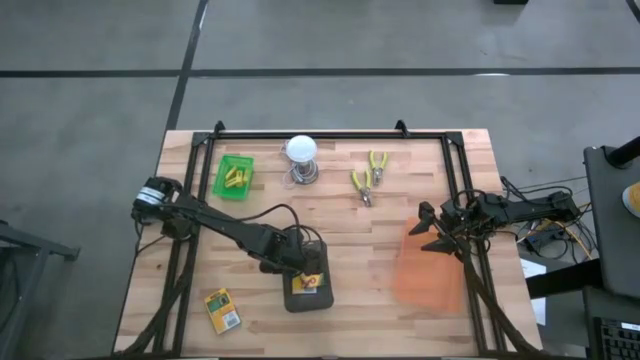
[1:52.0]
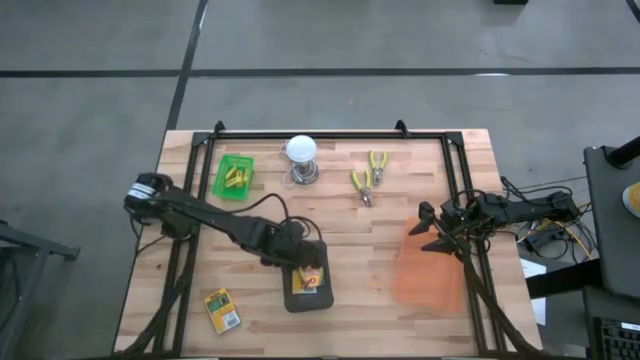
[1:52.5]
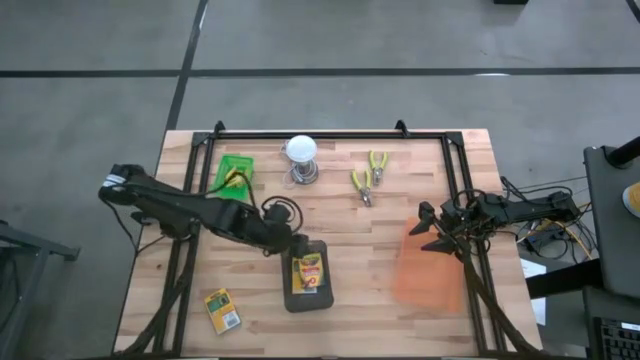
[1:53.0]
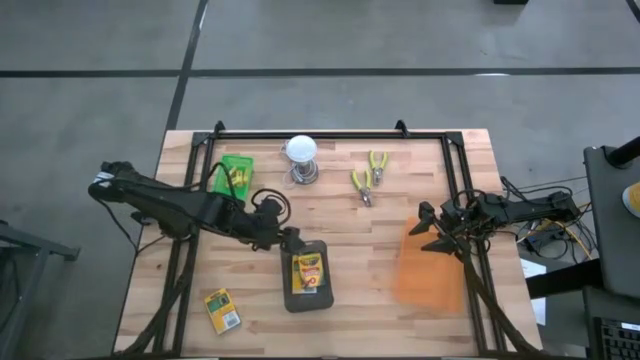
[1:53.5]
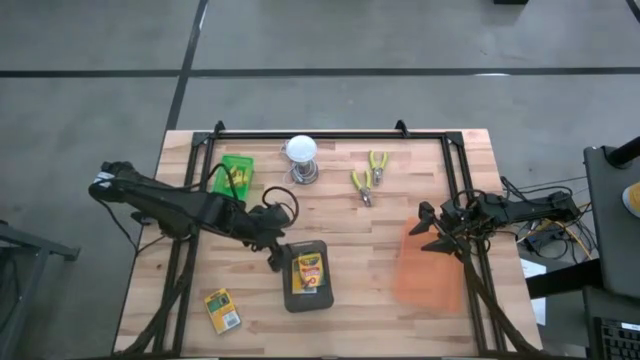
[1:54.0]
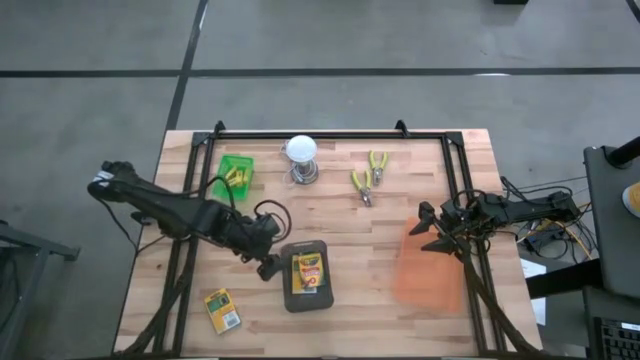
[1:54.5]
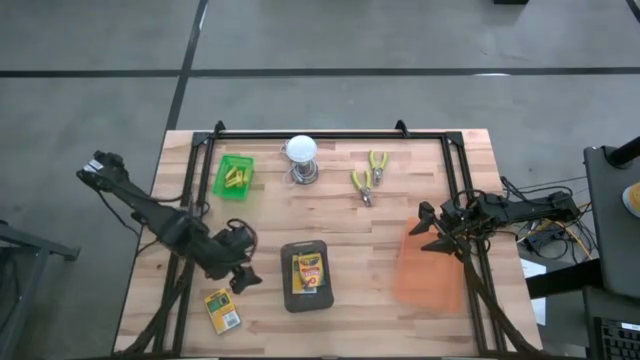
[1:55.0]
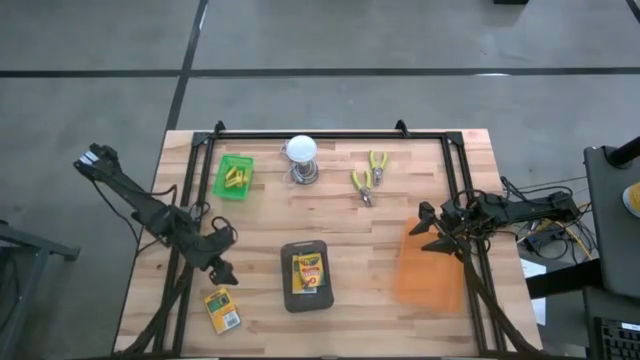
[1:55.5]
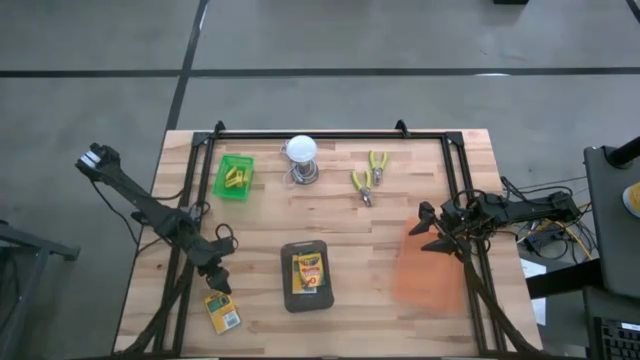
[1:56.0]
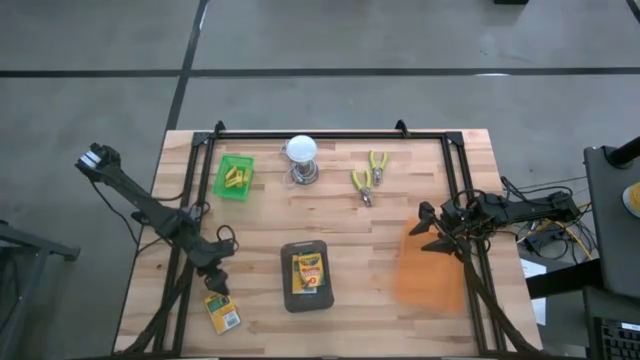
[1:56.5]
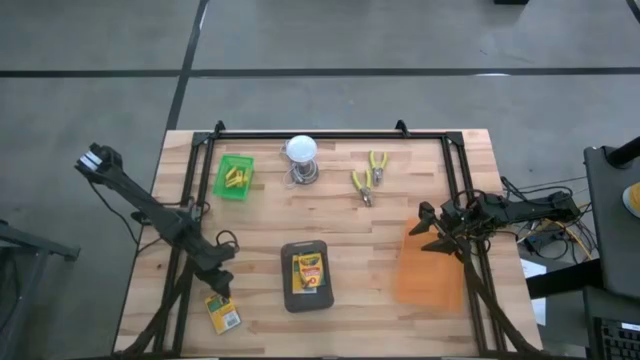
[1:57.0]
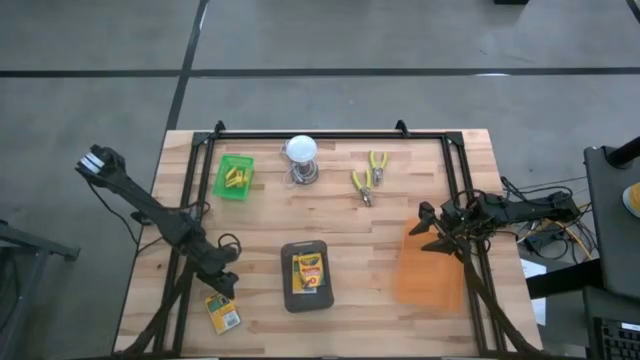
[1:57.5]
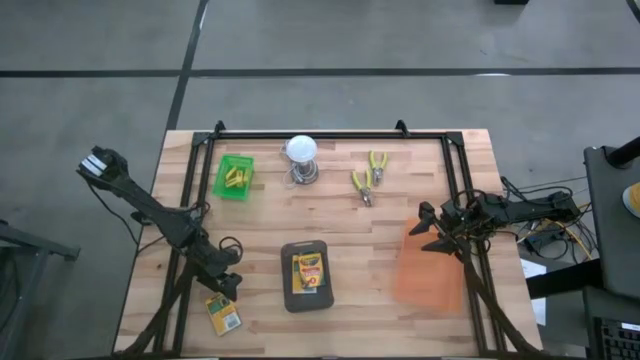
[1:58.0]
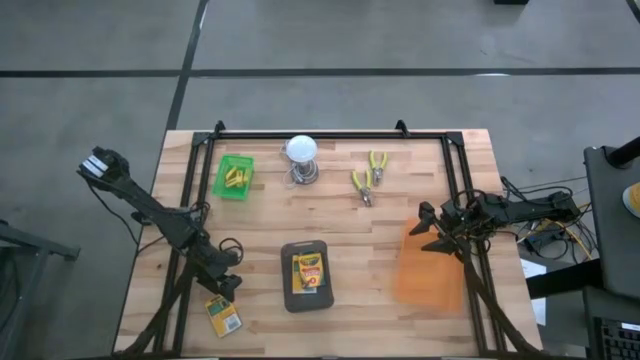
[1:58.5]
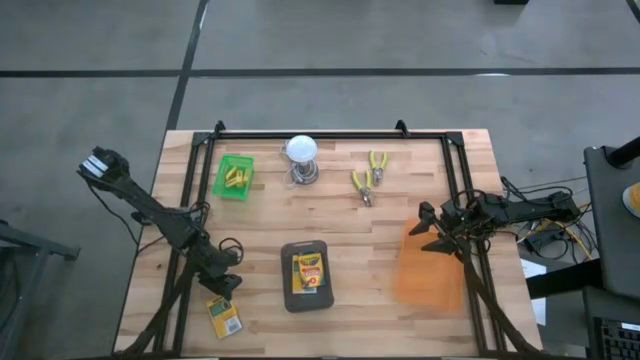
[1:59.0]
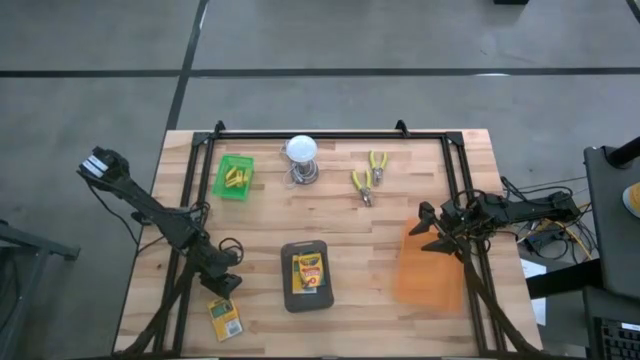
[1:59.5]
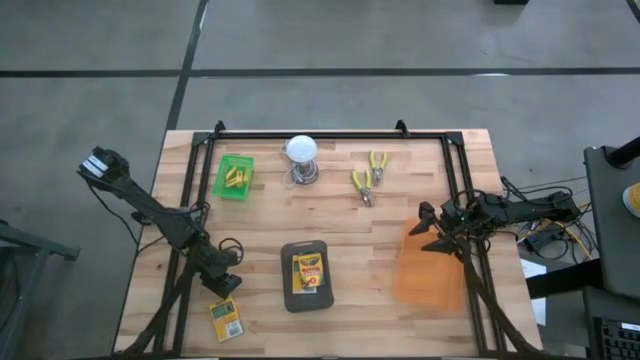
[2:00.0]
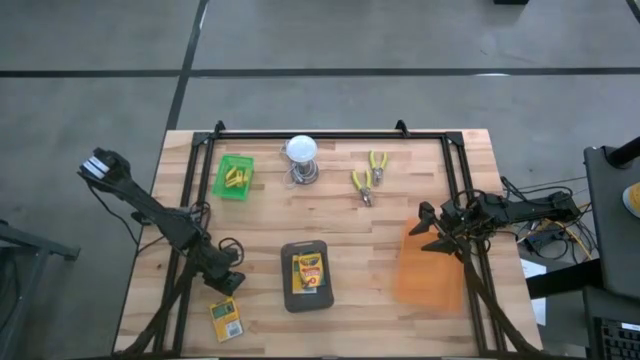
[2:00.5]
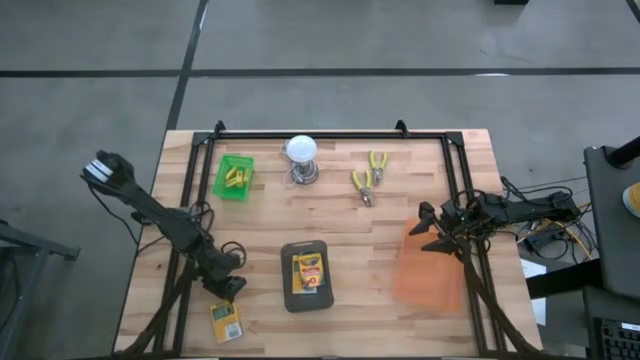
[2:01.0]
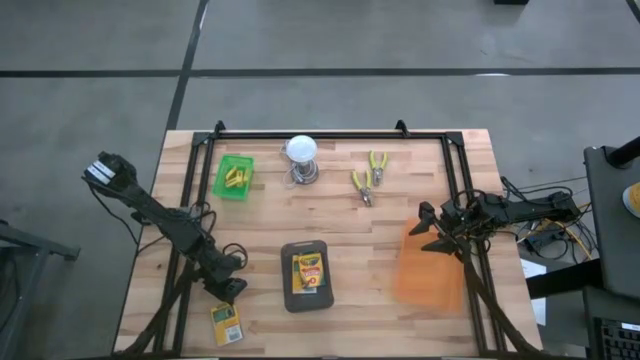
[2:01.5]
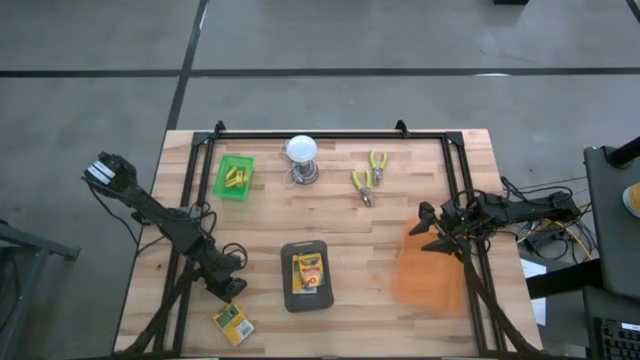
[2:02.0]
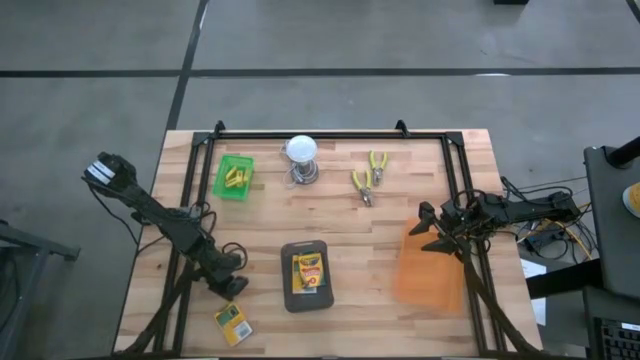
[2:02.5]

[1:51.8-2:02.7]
Task: Pick & Place School Supplies
Put the yellow crayon box into the black bin

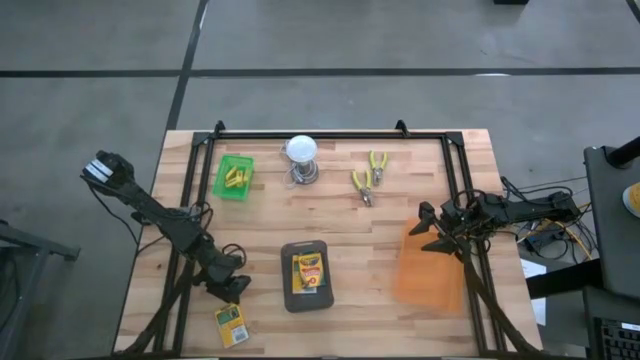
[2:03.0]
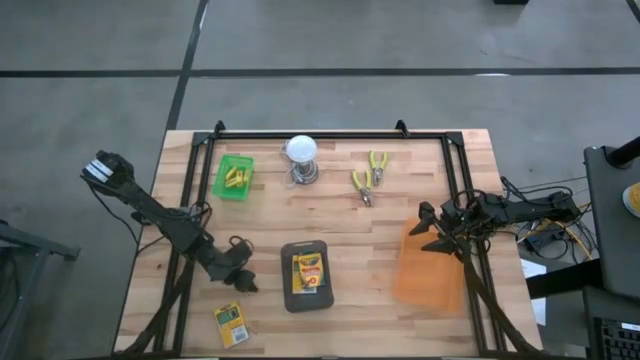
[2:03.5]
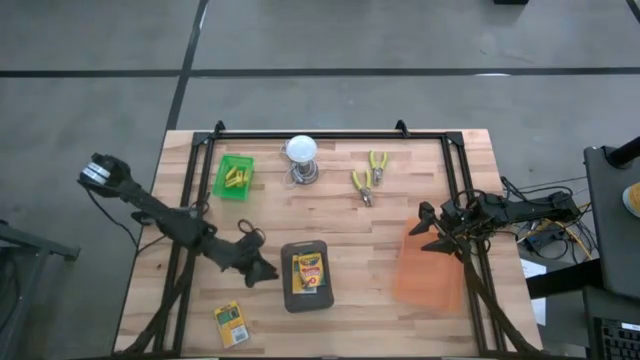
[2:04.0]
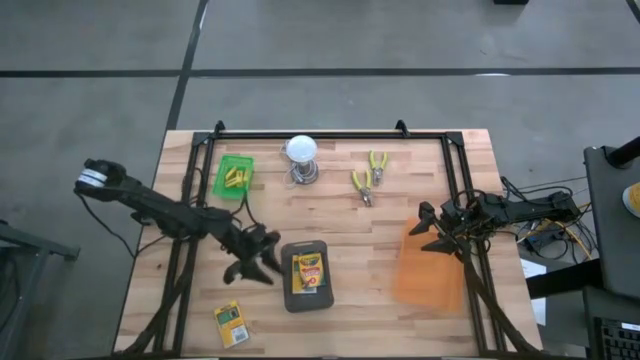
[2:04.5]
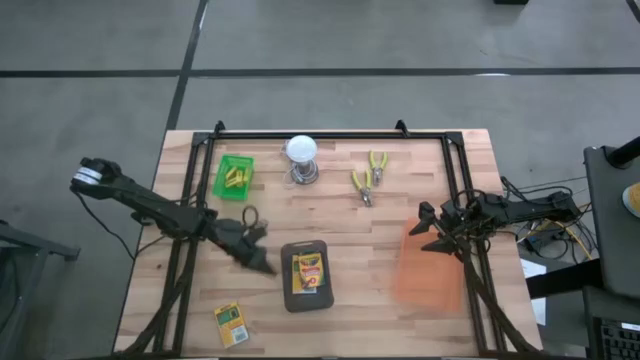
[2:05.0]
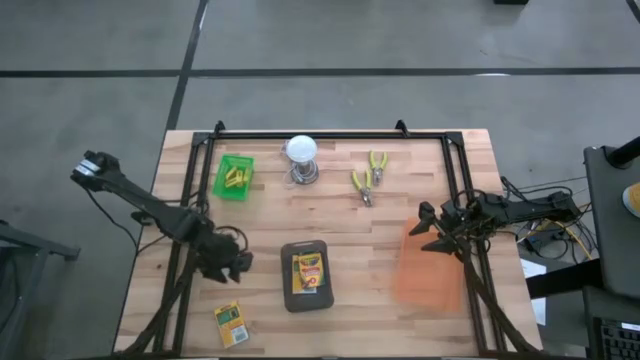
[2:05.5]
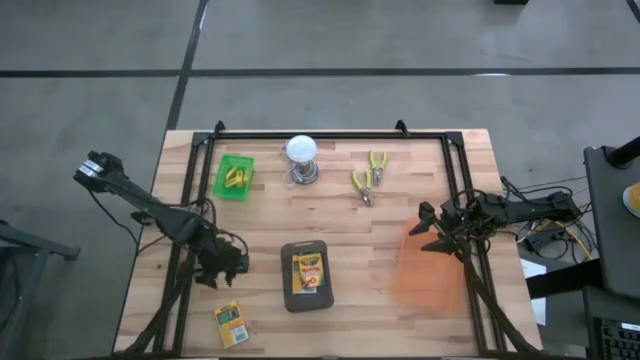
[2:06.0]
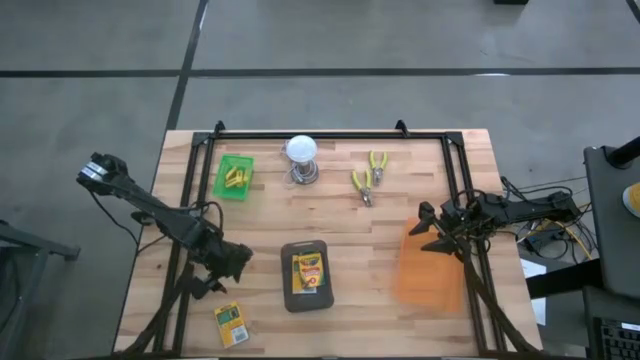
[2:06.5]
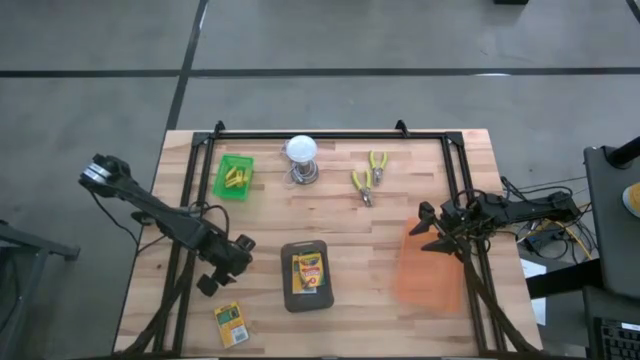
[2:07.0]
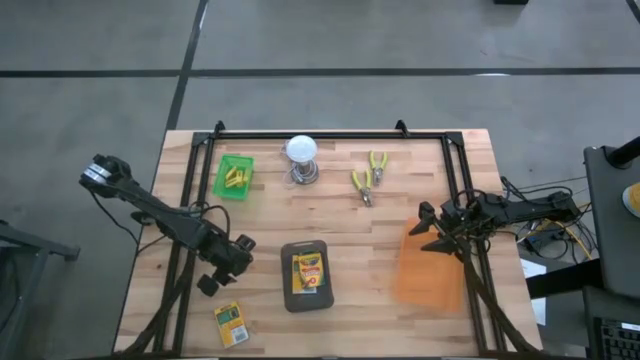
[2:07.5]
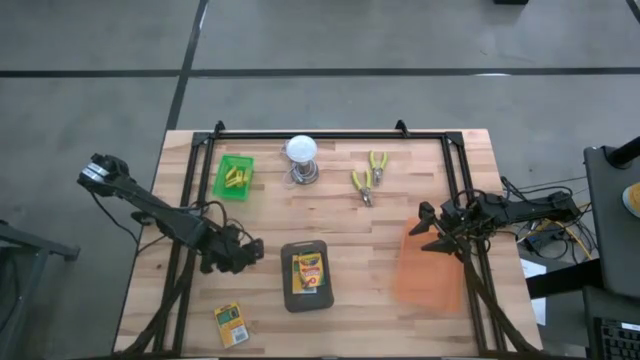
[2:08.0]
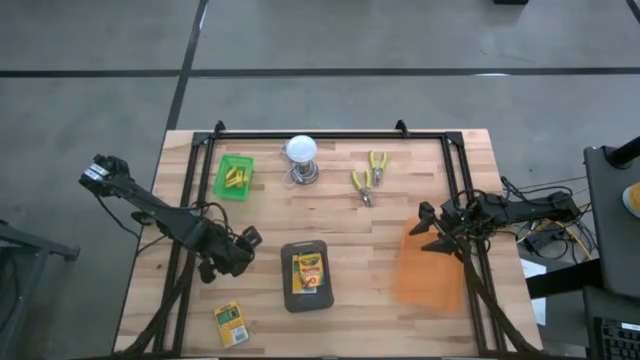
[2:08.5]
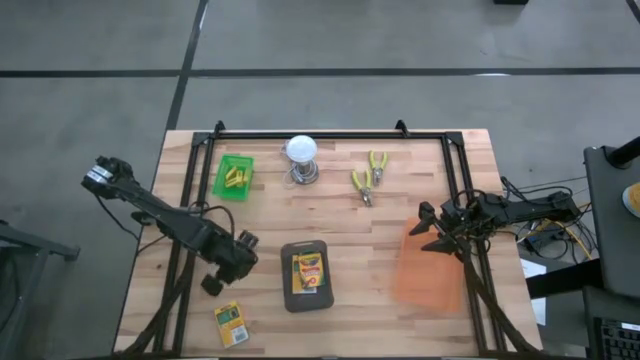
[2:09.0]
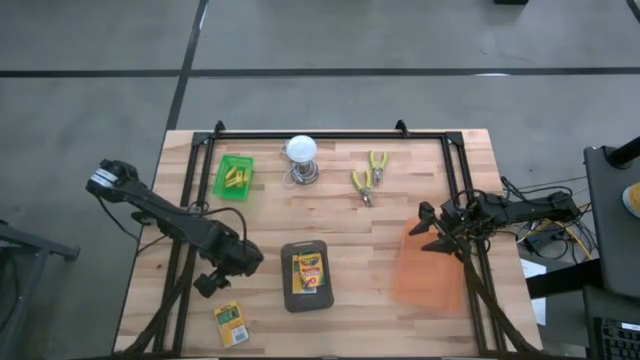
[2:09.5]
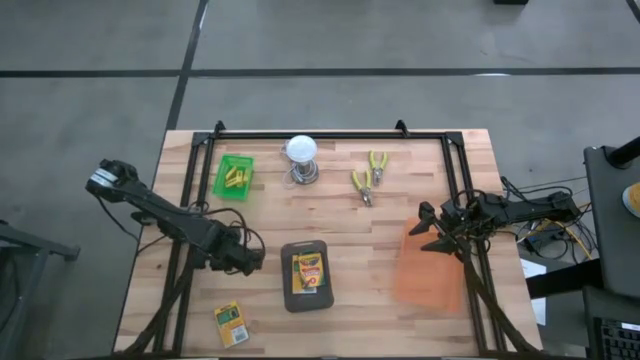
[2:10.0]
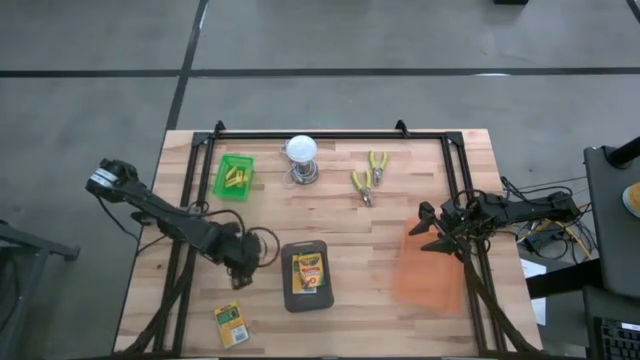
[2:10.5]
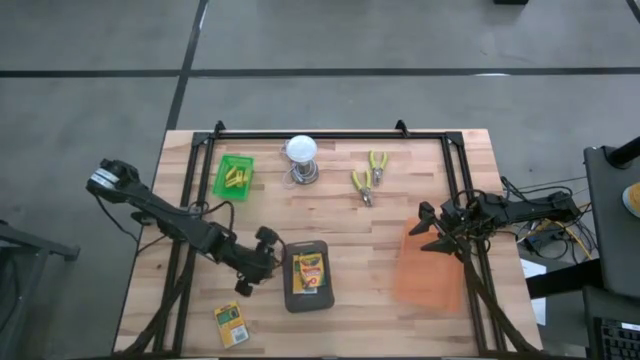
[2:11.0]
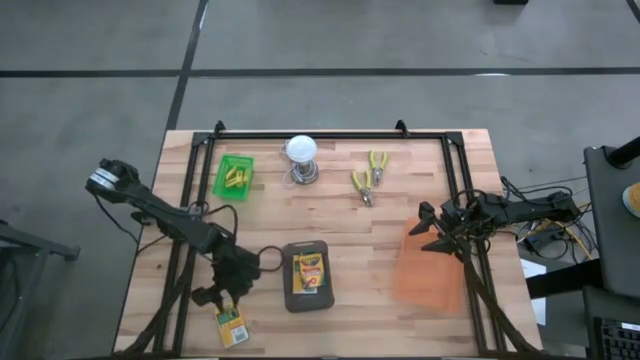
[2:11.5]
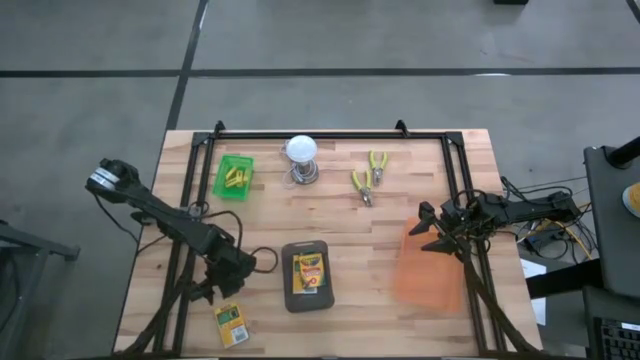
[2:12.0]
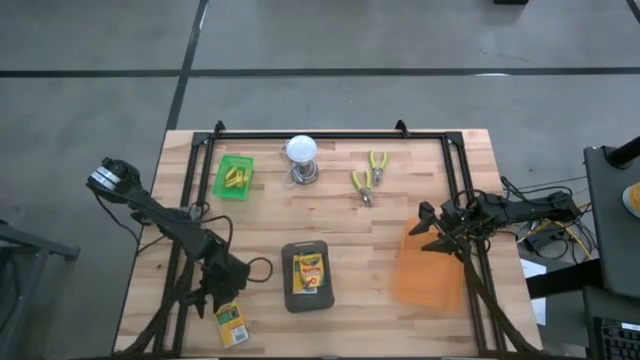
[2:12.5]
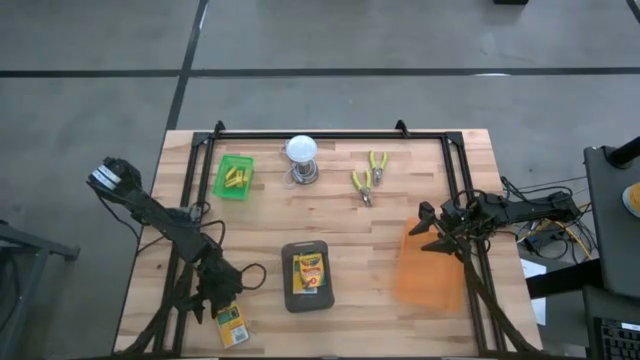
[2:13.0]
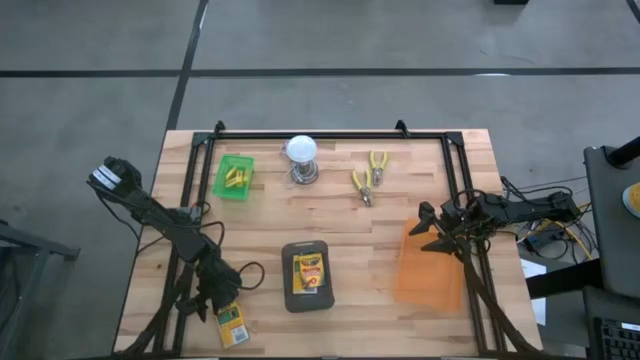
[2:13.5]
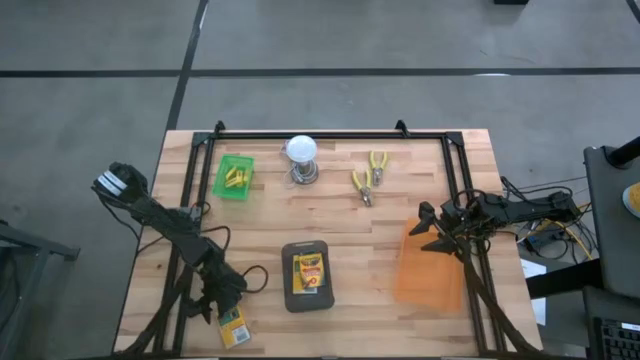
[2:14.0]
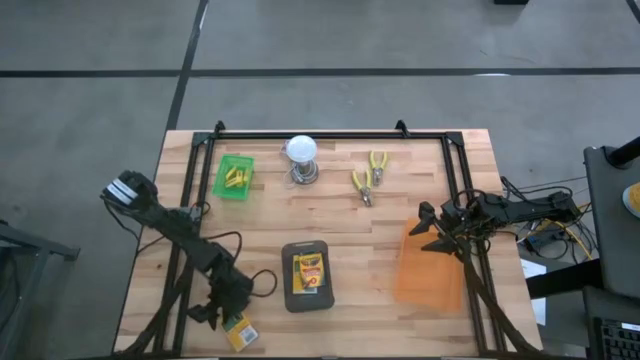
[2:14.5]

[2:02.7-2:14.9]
Put the yellow crayon box into the black bin
